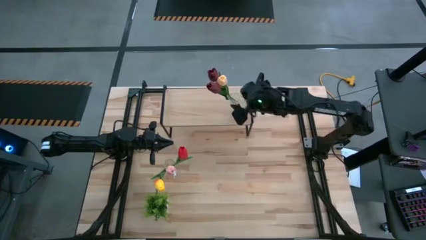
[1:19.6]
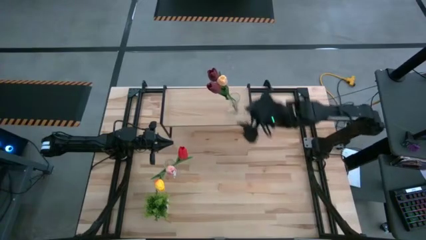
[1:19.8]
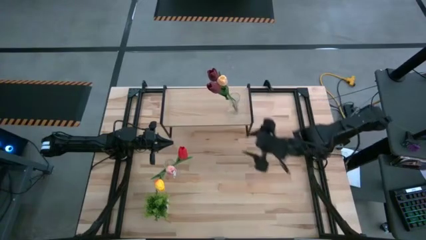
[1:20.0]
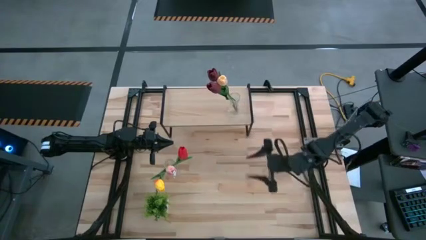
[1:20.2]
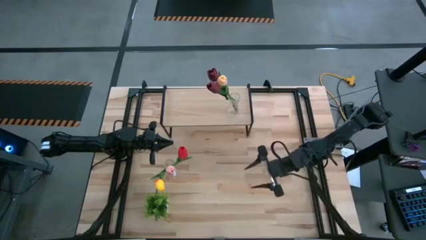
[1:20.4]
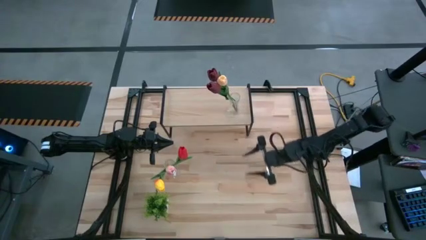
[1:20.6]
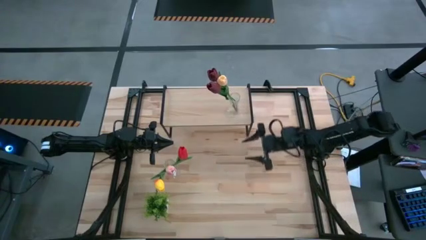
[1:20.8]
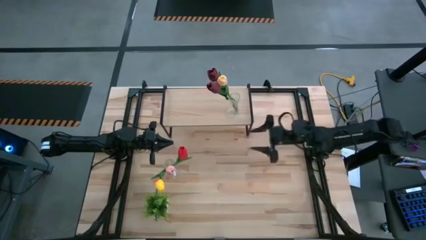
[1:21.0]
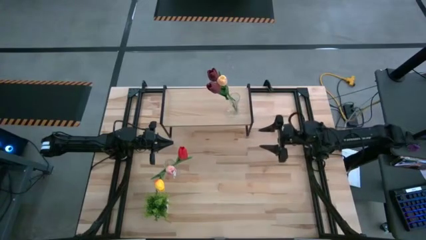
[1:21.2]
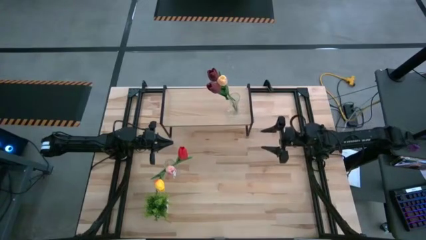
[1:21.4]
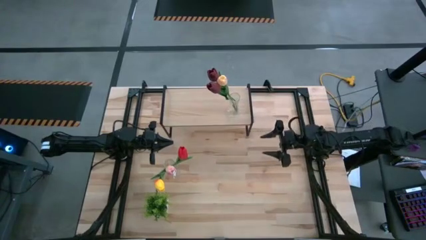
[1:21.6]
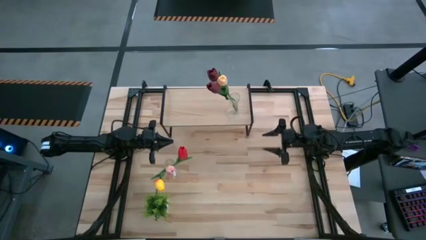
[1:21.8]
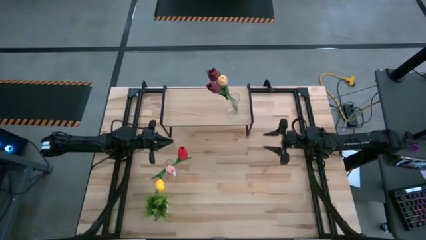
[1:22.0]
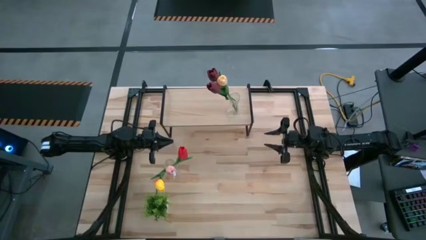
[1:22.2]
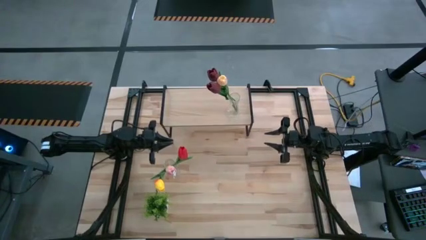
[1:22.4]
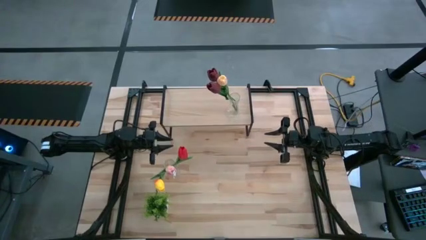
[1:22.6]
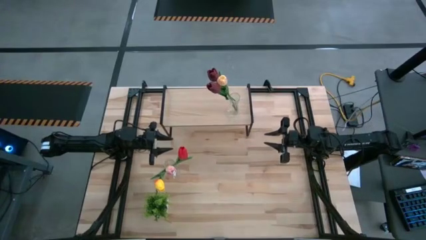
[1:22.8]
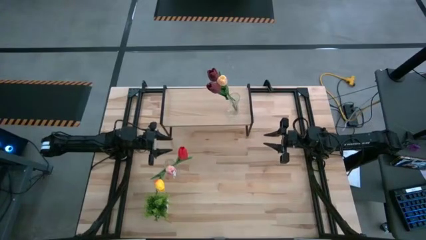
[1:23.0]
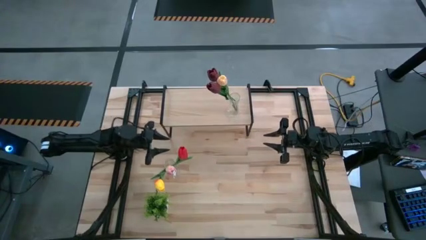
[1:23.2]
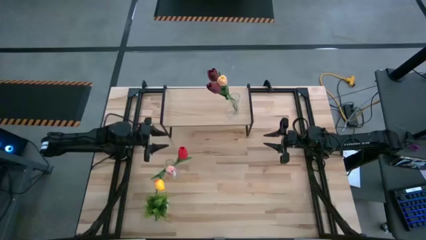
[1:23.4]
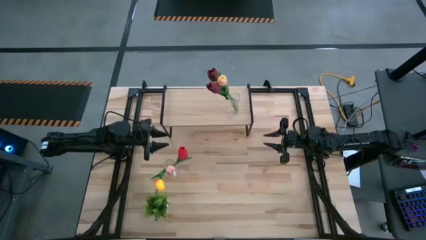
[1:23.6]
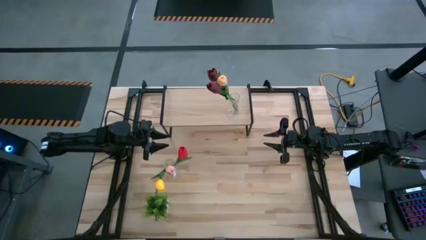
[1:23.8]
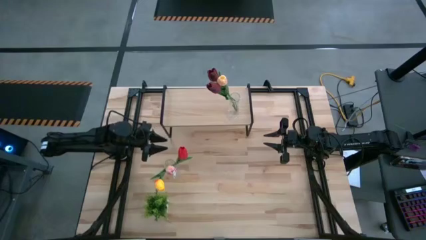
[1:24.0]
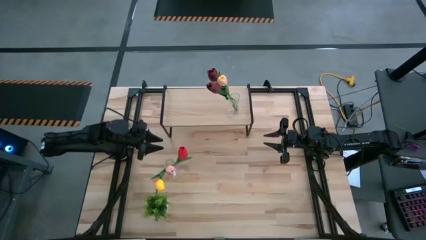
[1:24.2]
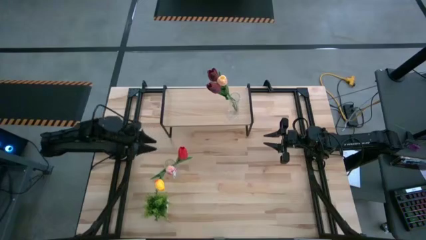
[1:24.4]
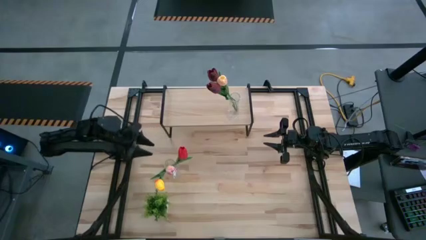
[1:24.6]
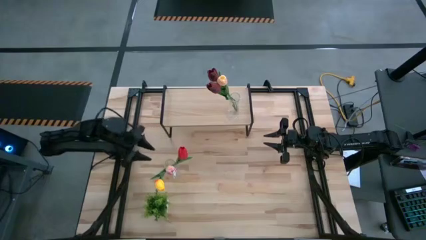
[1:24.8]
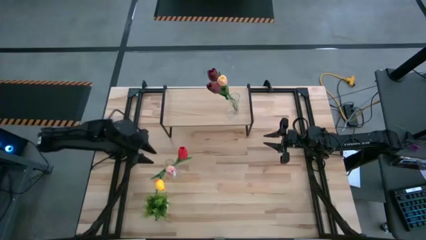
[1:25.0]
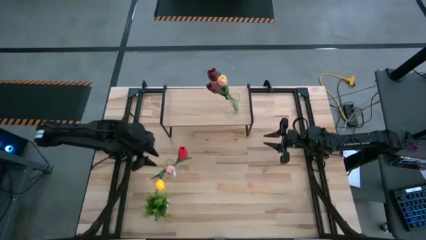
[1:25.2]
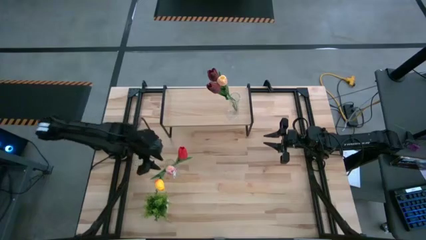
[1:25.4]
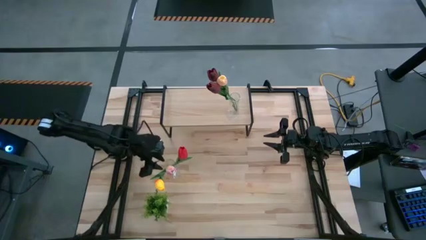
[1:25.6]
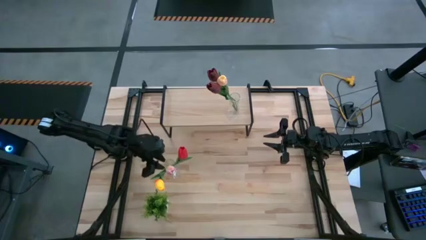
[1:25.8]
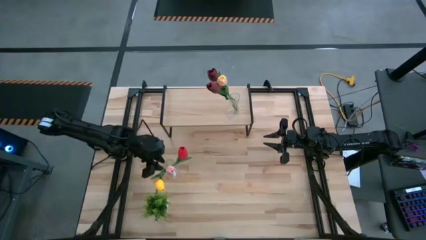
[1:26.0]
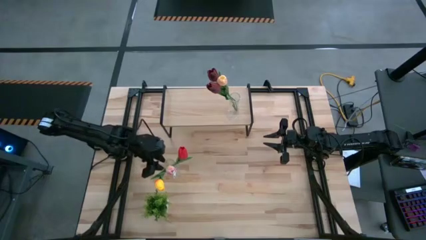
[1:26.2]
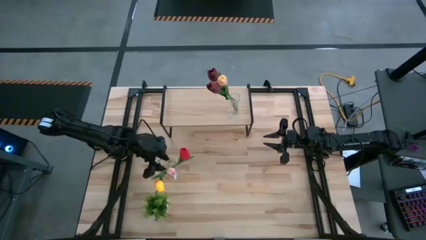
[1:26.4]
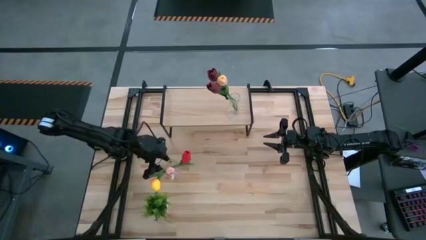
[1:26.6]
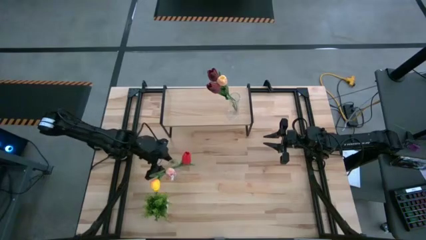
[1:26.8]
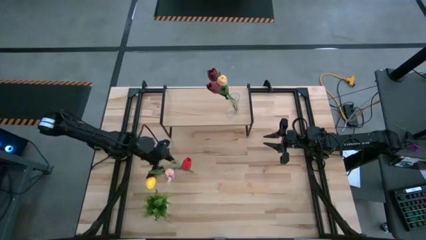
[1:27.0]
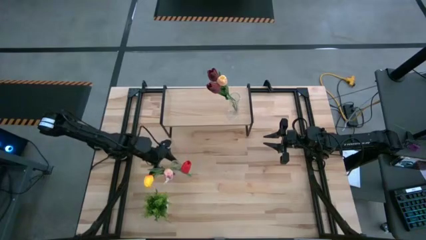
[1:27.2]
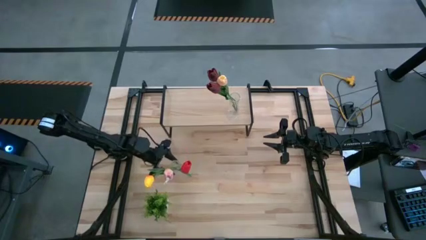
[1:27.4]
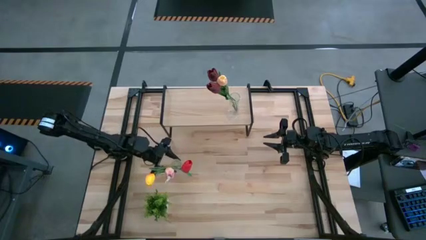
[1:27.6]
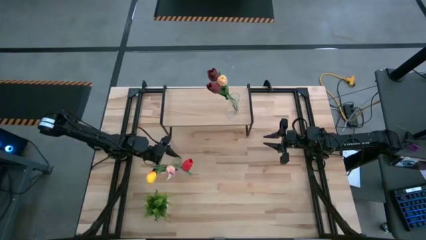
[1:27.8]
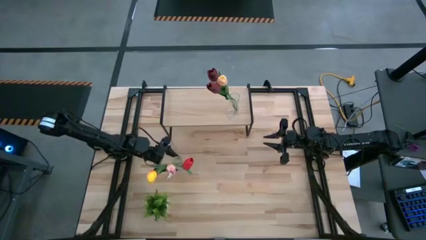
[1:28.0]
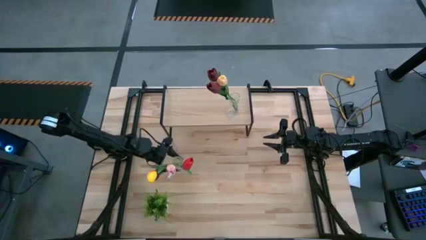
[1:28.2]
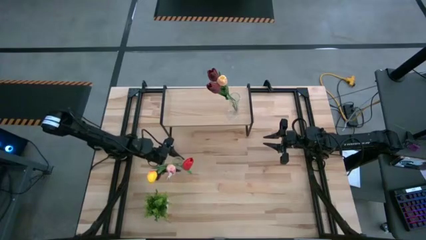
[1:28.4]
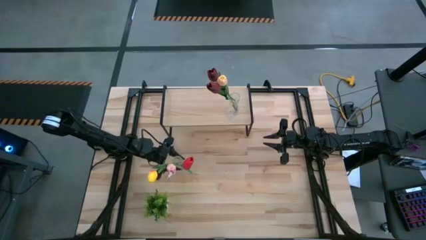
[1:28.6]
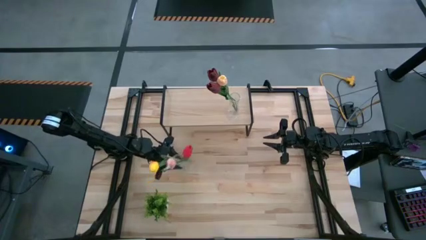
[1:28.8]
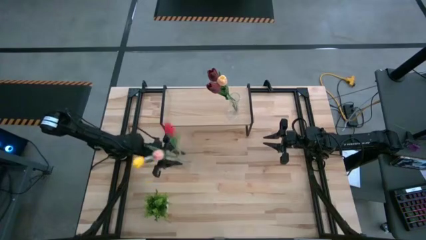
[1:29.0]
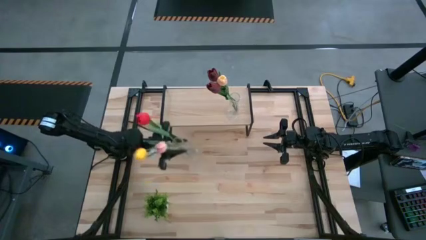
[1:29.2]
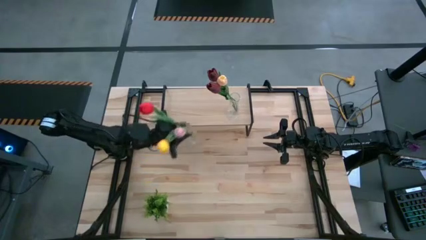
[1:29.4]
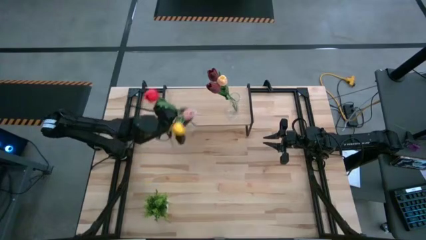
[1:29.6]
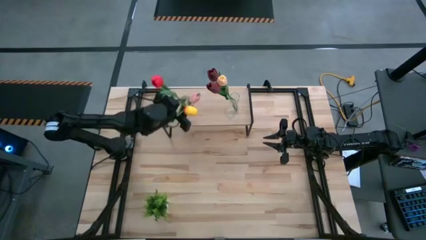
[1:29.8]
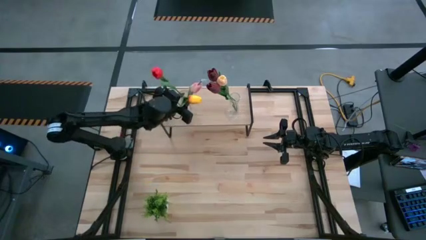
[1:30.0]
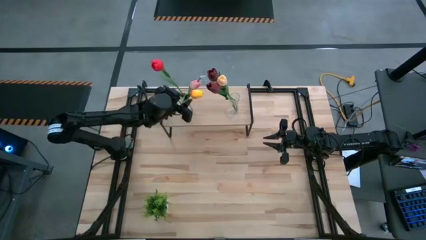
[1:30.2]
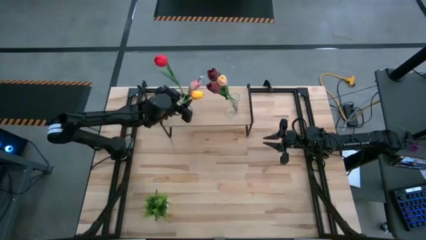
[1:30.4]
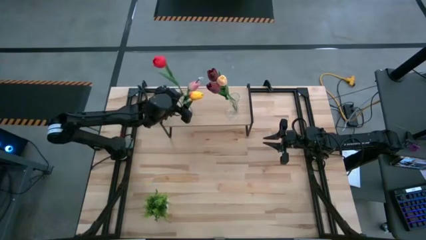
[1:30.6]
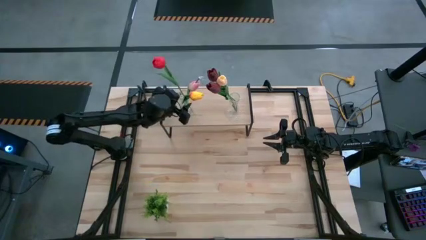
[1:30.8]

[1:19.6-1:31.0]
Task: Pick and place flowers into a vace then onto a shelf
Put the transparent flower vase with the flowers on the shelf

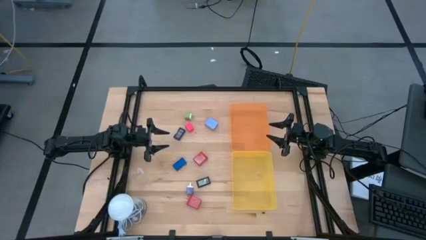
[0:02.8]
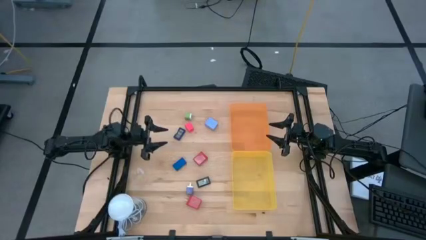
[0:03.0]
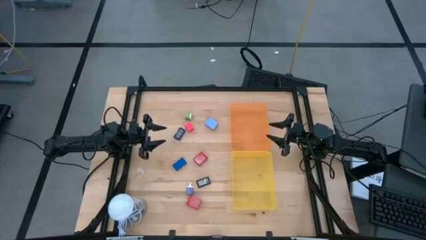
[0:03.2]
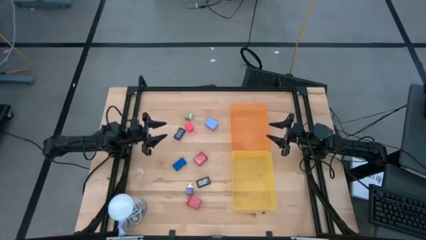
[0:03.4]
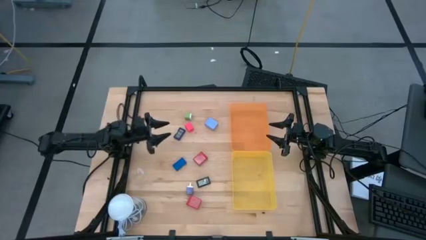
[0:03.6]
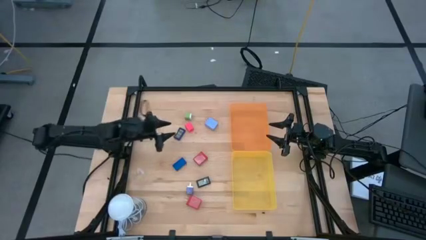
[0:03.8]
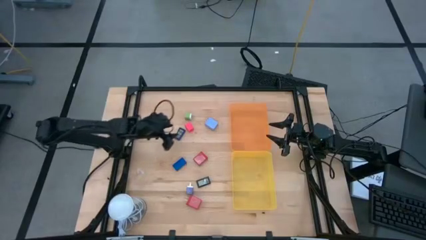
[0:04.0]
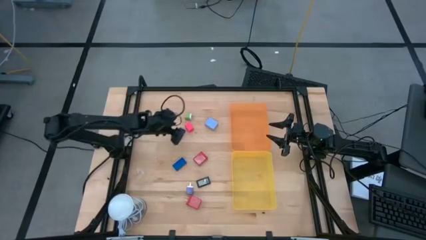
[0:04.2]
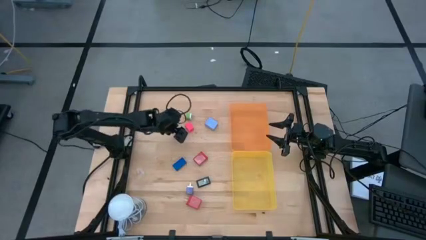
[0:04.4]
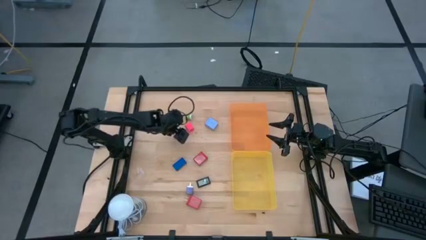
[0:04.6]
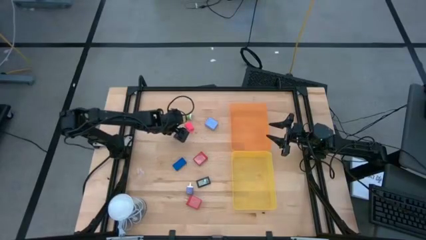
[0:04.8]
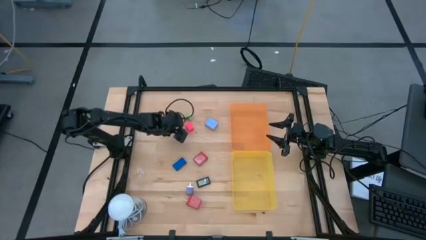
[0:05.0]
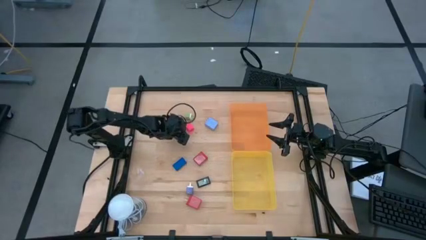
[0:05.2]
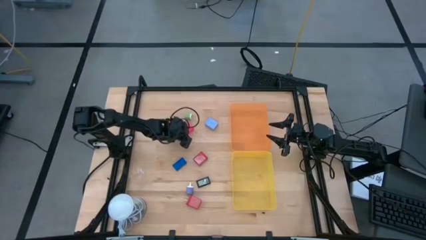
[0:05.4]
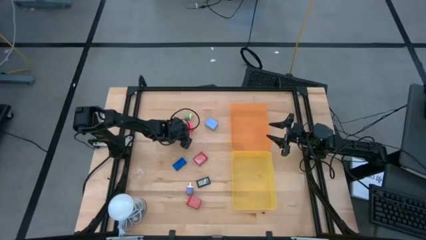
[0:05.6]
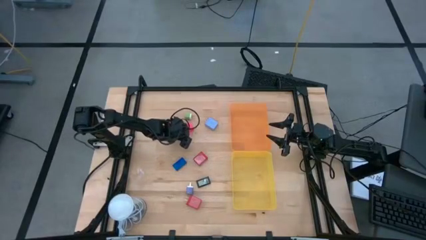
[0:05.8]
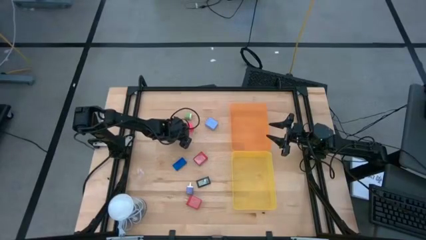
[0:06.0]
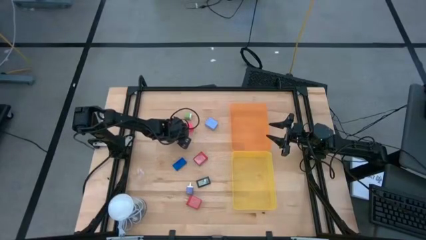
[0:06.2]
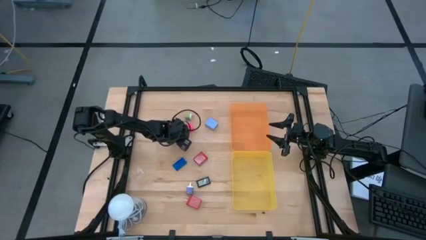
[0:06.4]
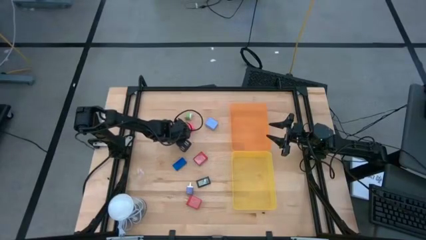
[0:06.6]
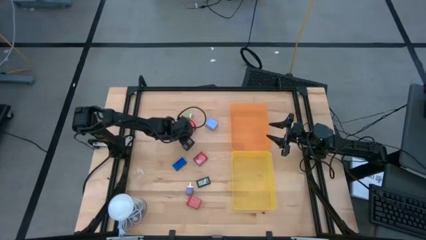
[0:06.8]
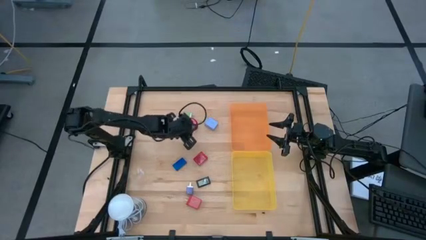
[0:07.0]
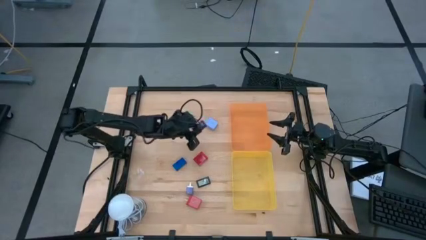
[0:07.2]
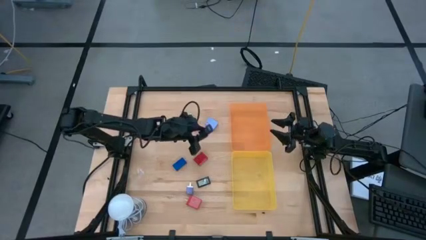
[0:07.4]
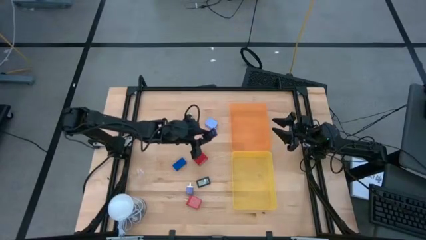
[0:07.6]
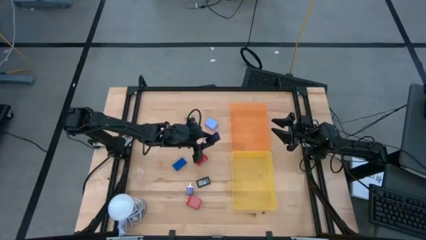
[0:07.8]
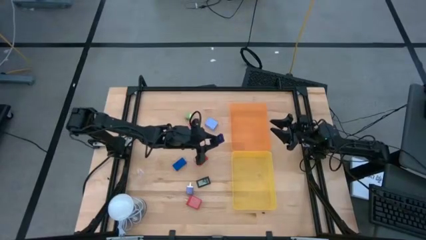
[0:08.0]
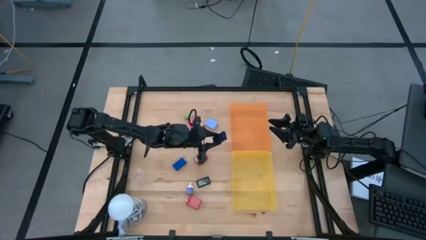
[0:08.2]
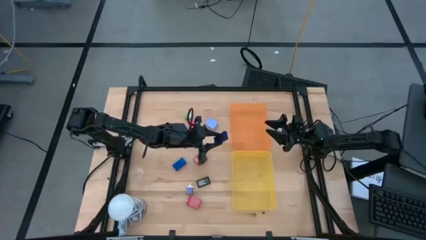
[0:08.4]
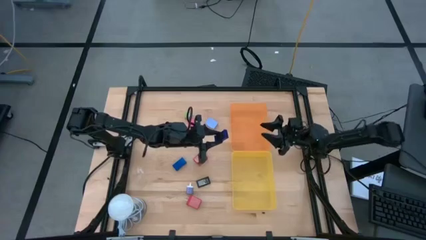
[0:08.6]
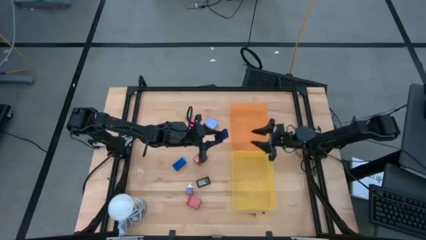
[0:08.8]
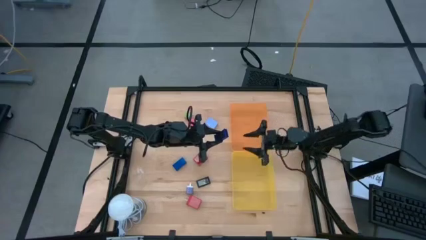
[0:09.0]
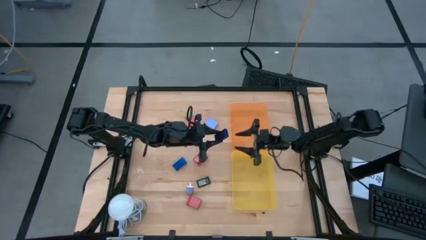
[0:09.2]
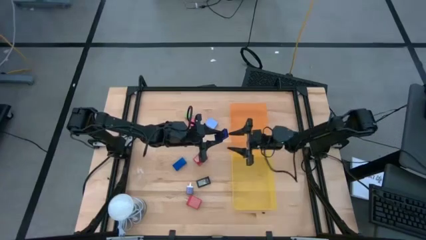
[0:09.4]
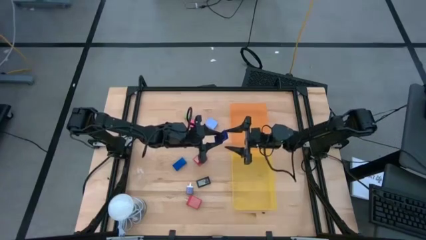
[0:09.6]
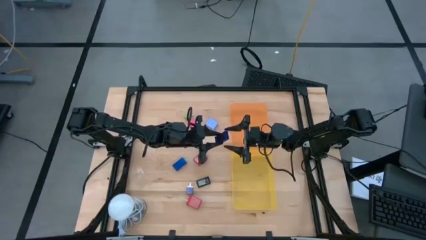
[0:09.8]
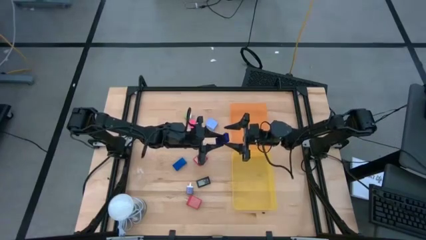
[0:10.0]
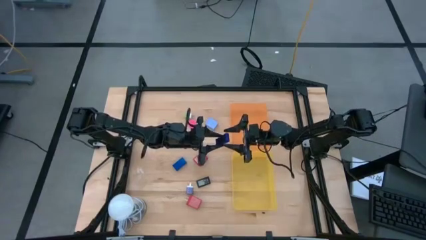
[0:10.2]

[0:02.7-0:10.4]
Task: Pick & Place Office items
Put the dark blue timer into the orange bin
